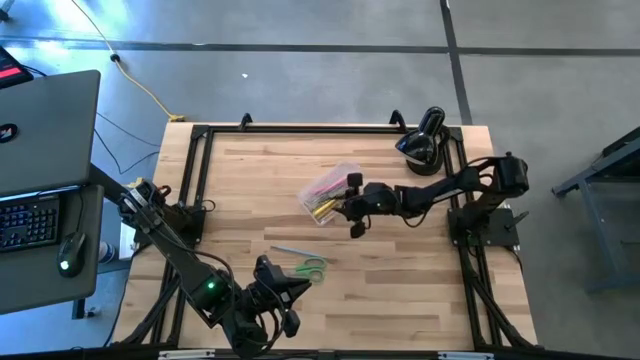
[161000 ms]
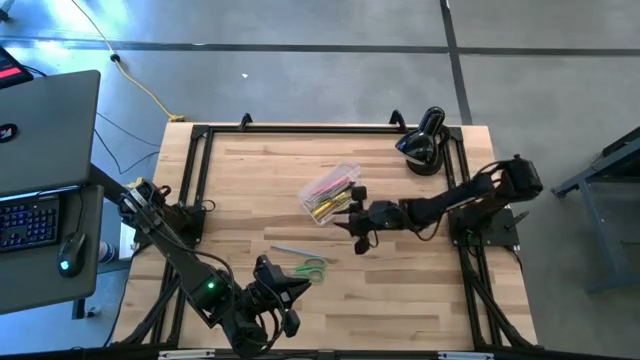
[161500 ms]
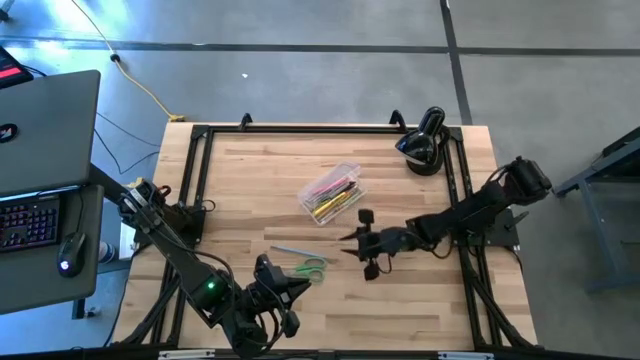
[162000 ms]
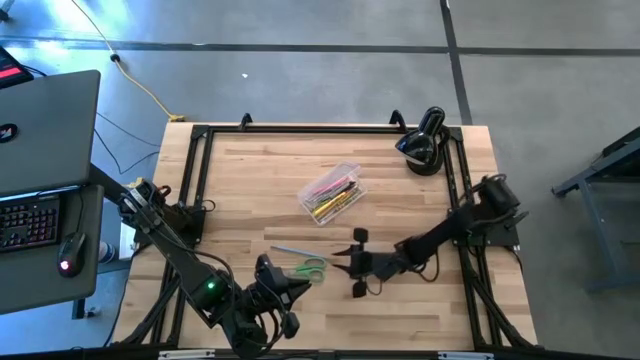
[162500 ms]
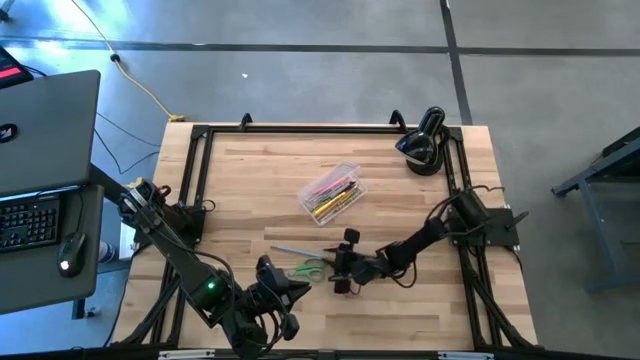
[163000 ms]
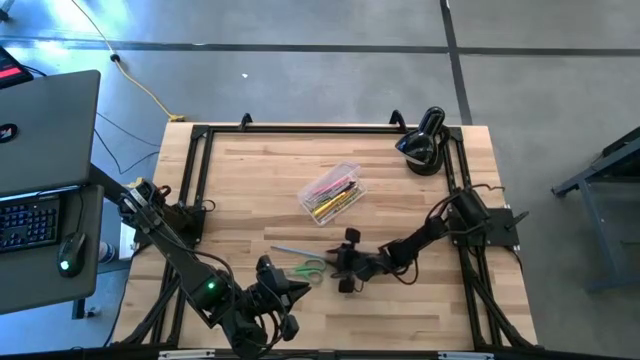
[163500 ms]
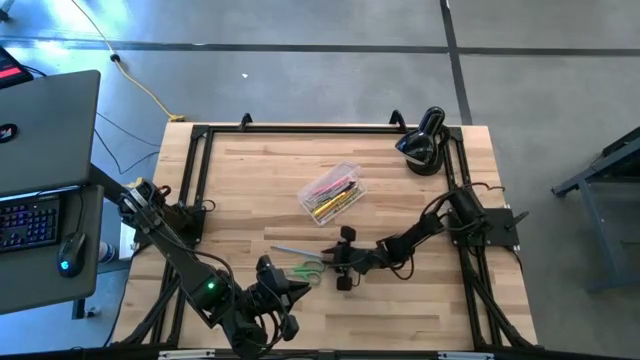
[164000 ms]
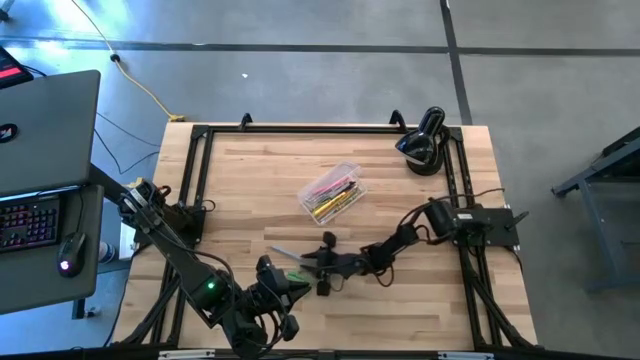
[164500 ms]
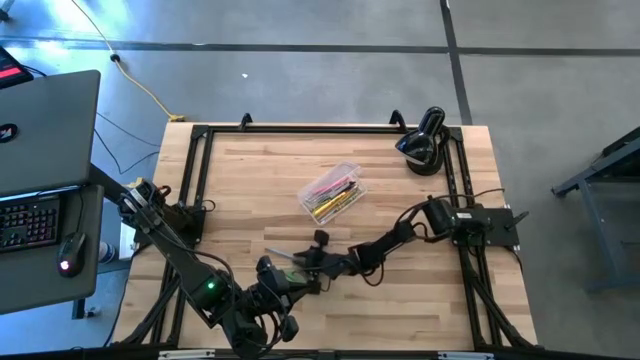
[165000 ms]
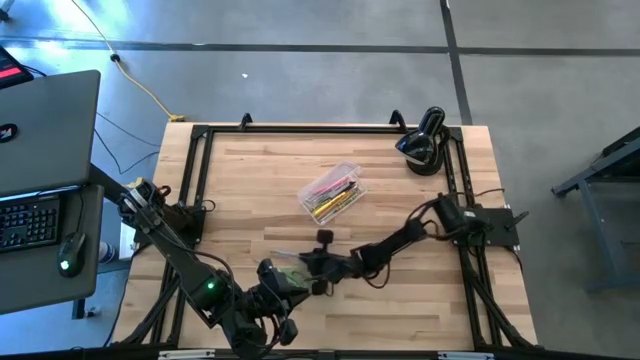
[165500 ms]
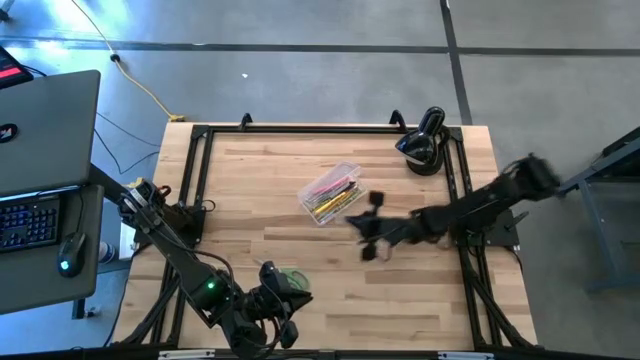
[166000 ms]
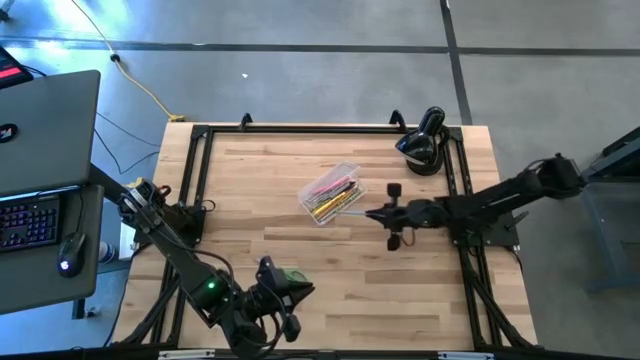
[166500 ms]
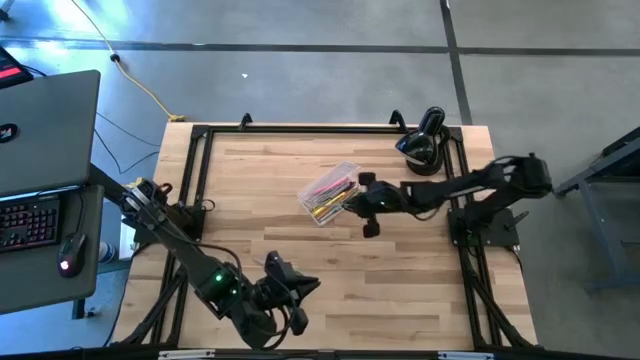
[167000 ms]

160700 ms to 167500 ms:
Task: Pick & place school supplies into a supply box
Put the blue pencil into the supply box

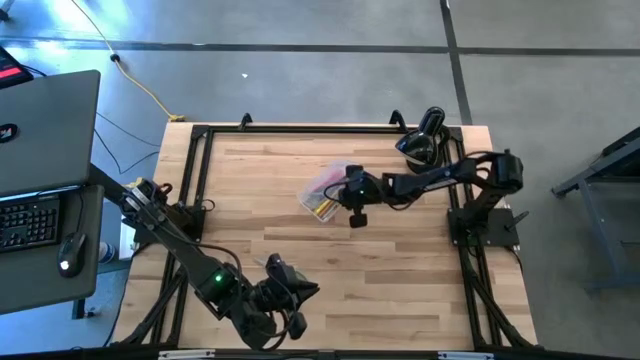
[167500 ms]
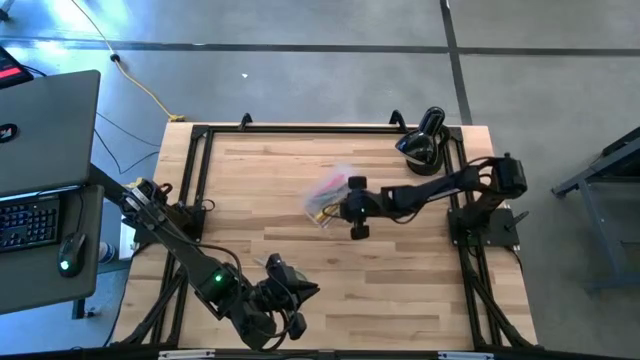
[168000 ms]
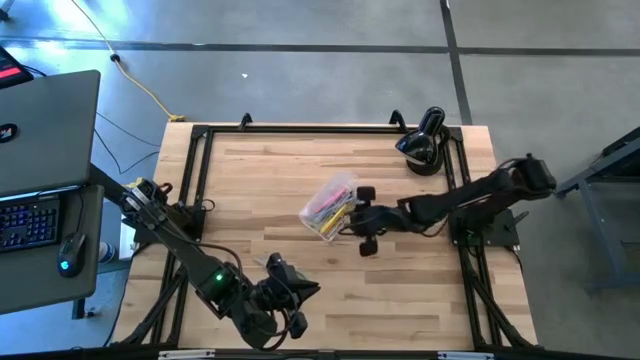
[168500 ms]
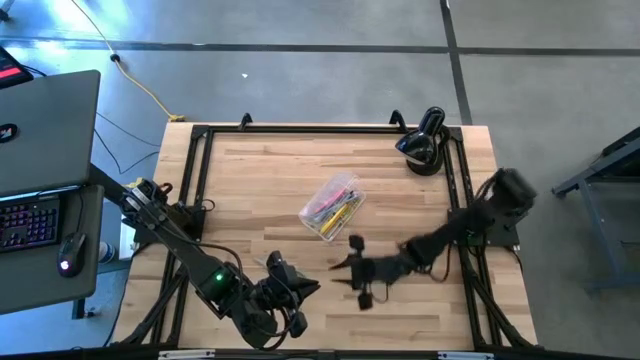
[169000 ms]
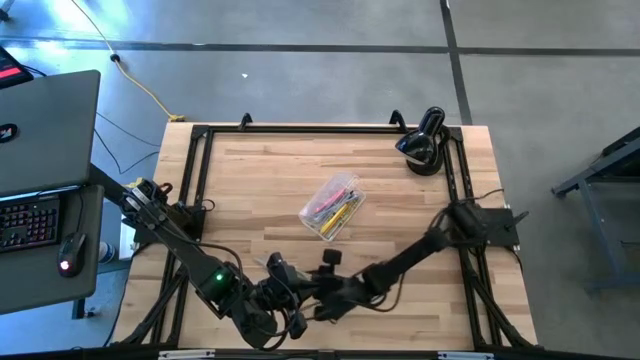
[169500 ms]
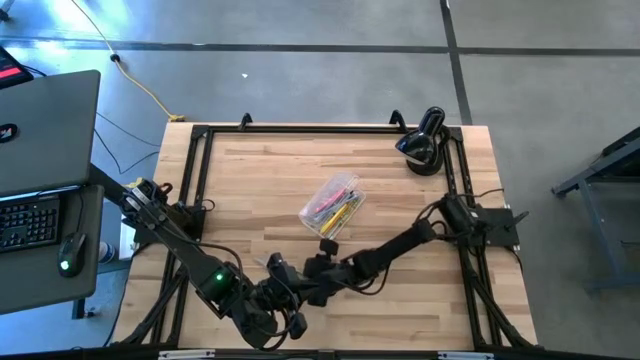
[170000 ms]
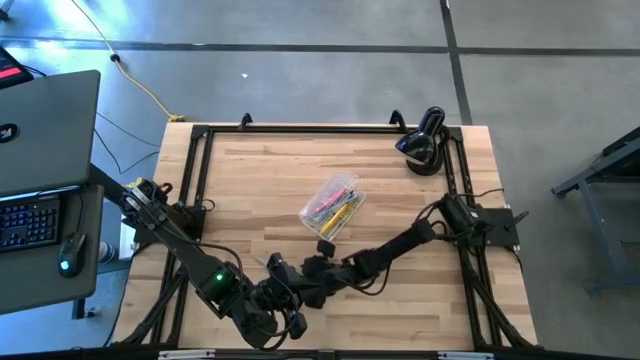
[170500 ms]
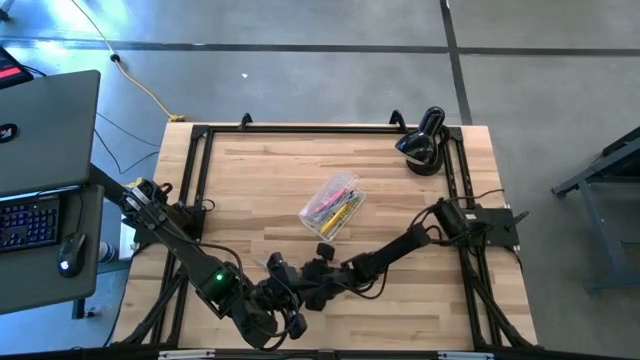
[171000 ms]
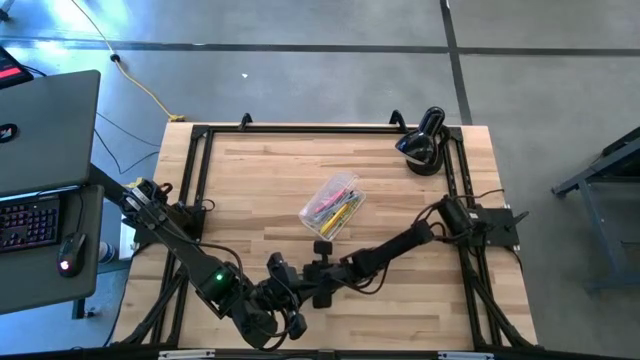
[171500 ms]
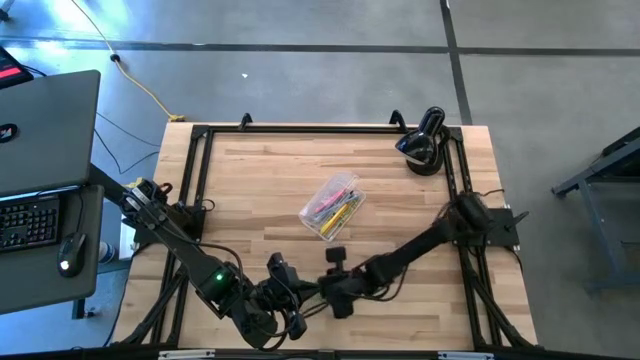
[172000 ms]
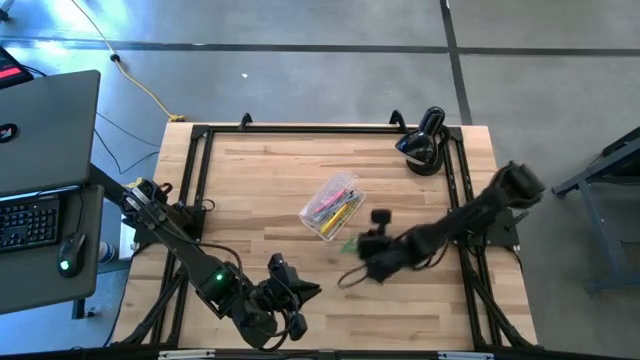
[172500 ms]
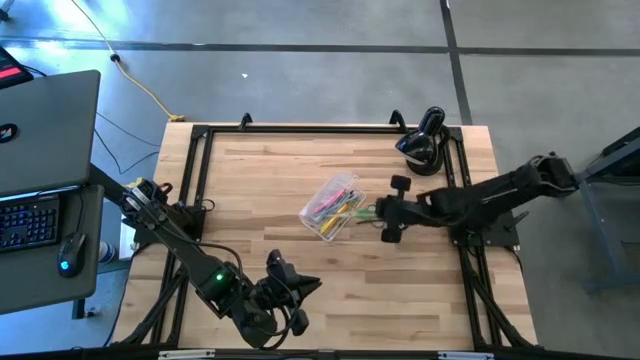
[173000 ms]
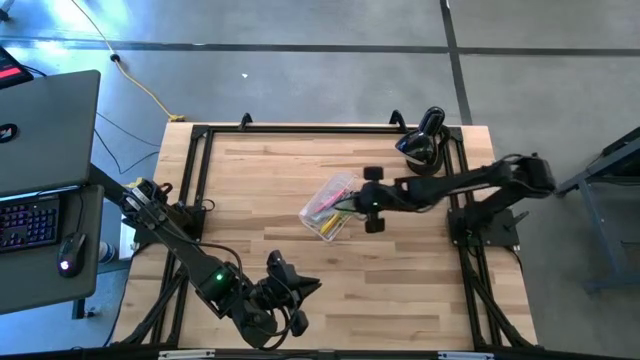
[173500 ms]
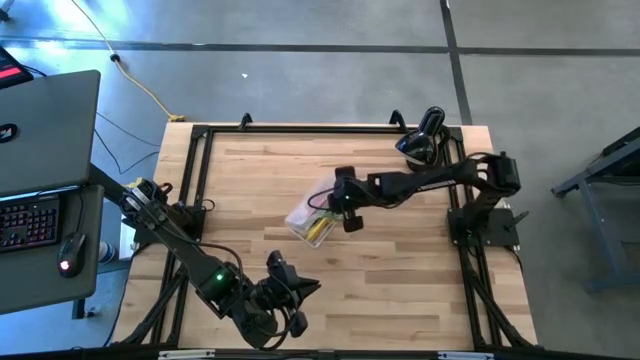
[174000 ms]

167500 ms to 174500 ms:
Put the scissors into the supply box

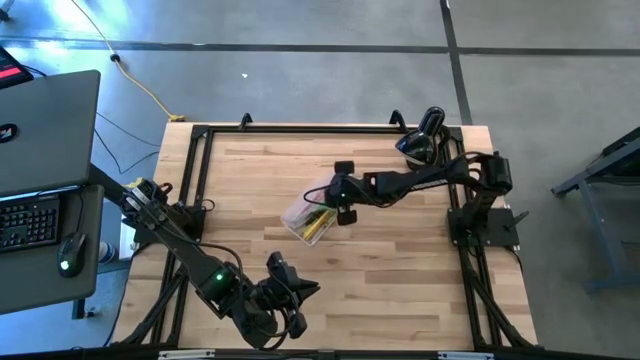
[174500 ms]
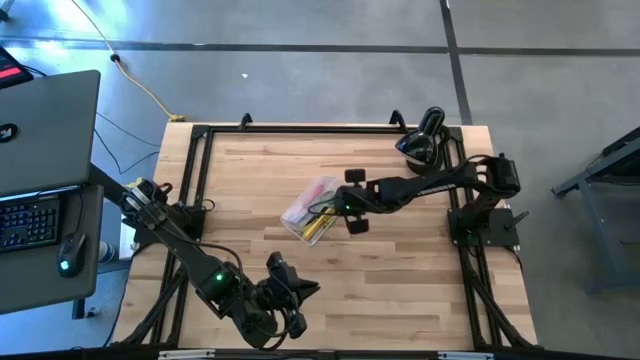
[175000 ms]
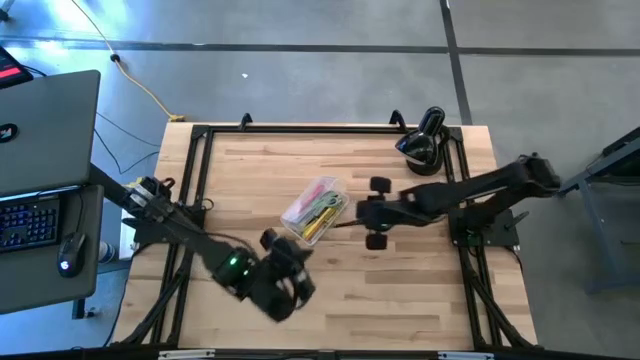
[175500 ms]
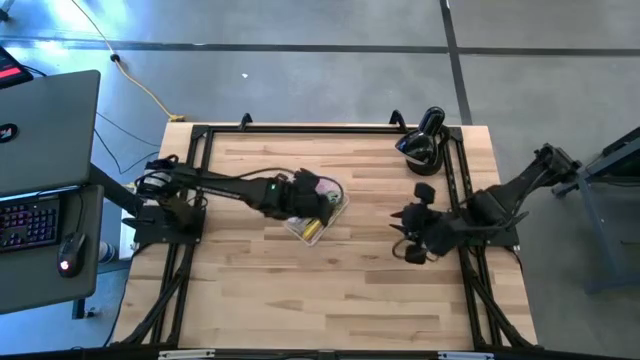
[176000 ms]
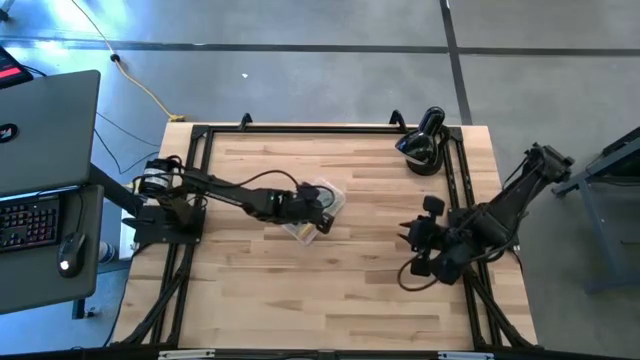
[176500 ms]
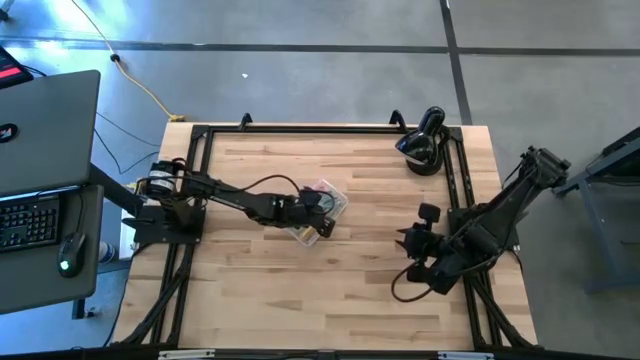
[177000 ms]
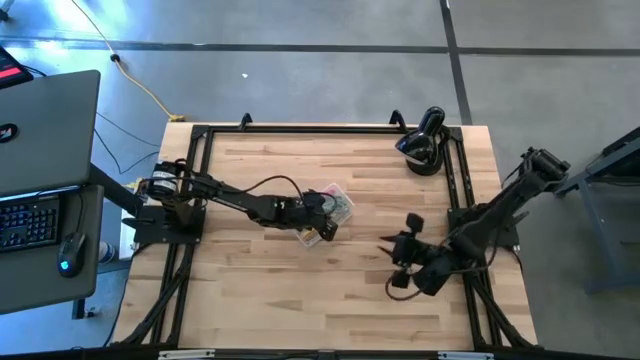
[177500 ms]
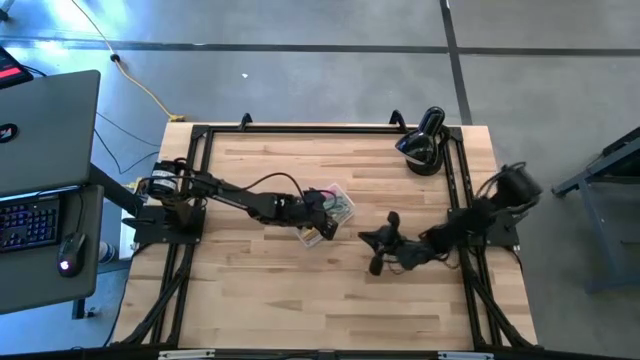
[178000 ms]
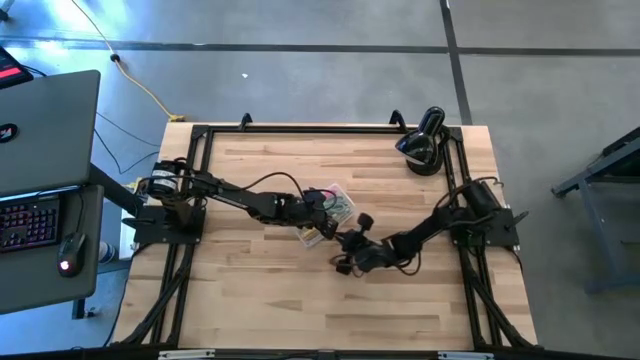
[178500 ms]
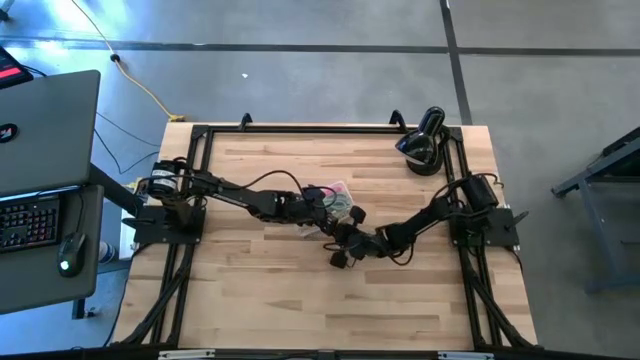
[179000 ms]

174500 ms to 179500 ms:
Close the supply box

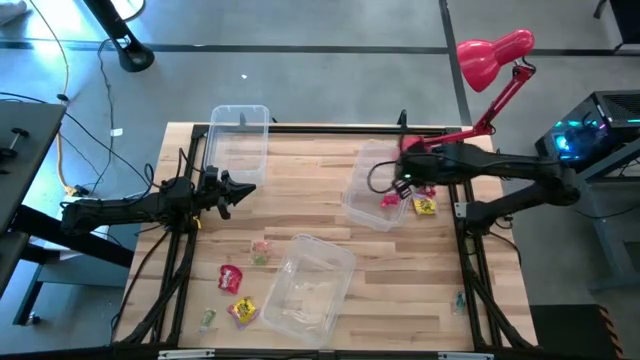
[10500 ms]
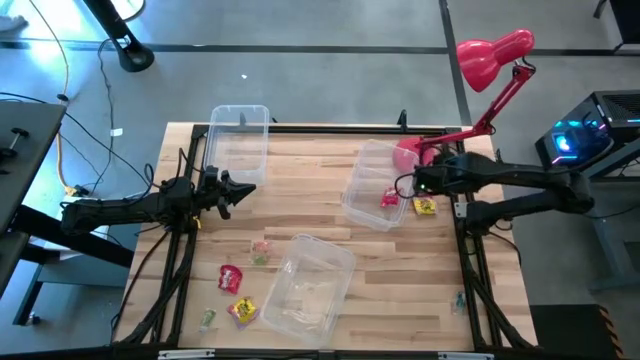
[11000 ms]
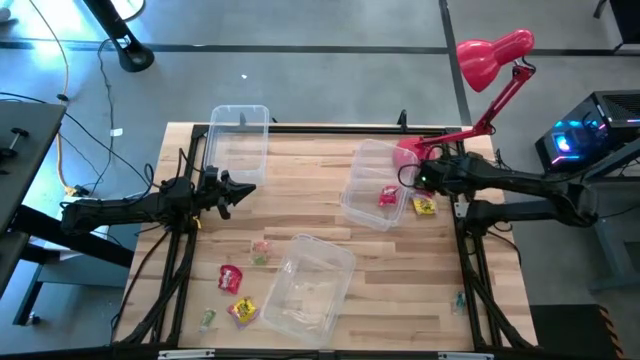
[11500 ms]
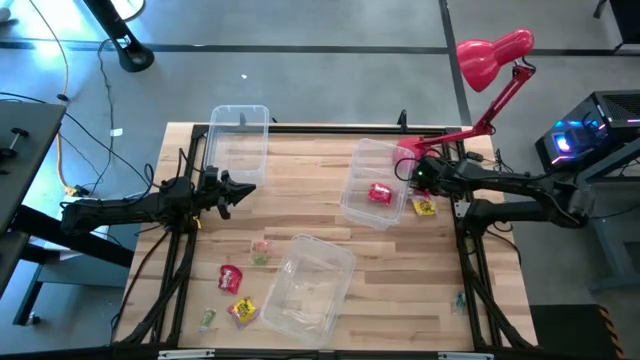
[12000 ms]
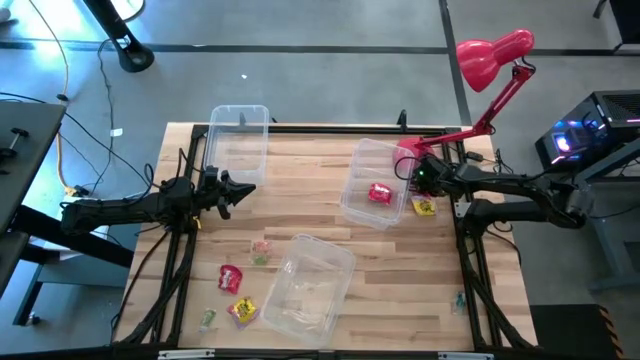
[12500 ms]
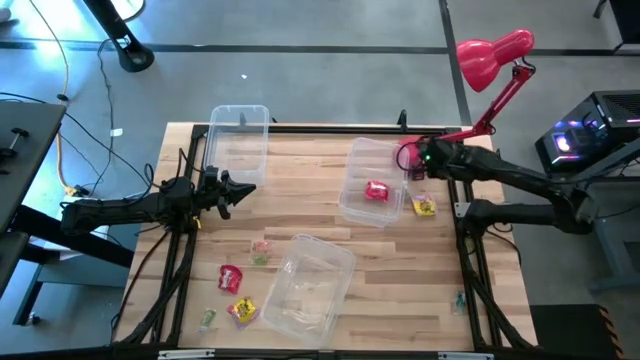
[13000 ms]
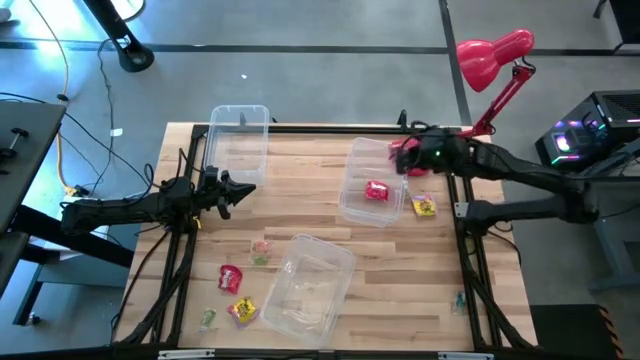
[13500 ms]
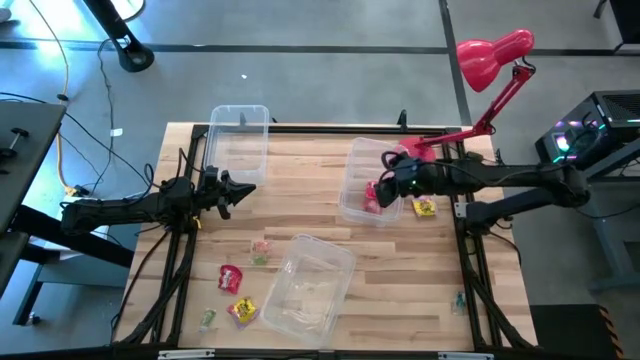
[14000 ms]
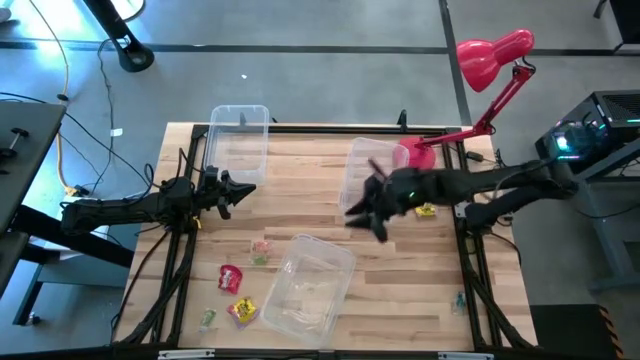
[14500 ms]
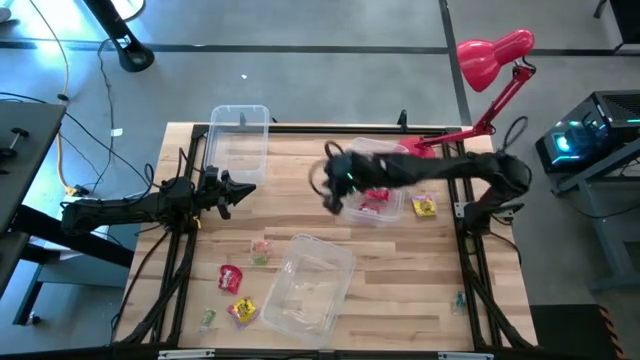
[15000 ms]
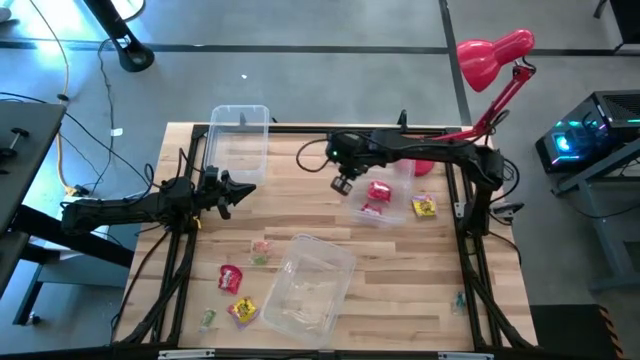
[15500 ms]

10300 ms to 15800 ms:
Task: Sort candy
Put the top red candy pack into center transparent bin
